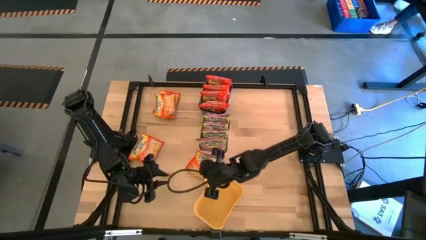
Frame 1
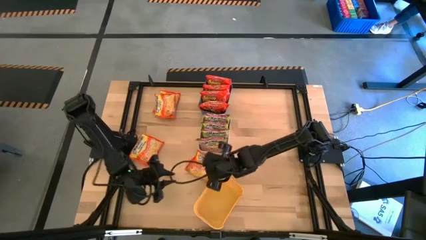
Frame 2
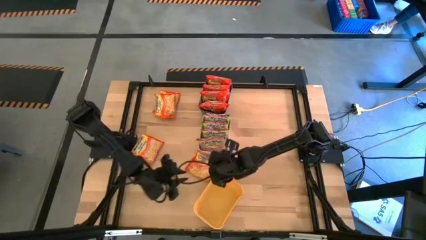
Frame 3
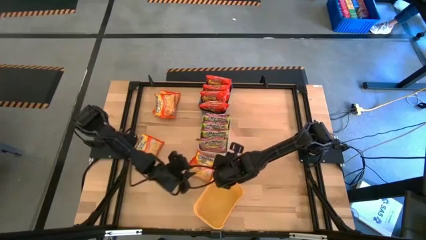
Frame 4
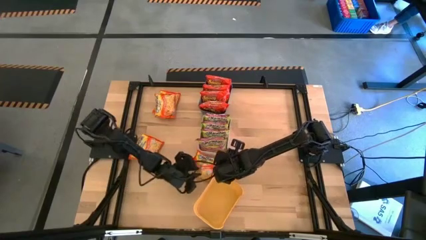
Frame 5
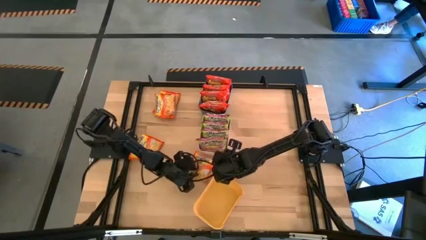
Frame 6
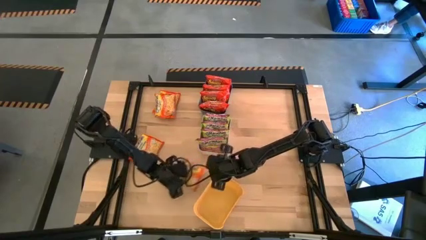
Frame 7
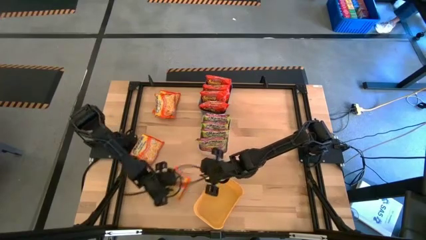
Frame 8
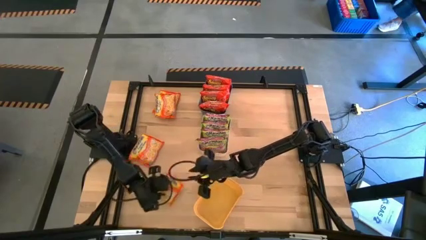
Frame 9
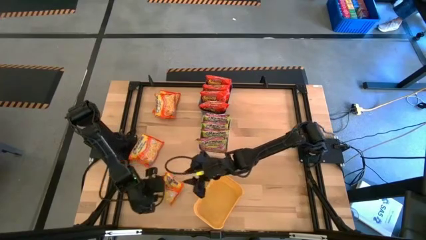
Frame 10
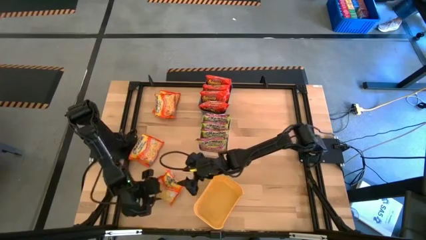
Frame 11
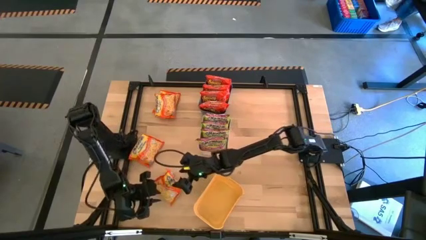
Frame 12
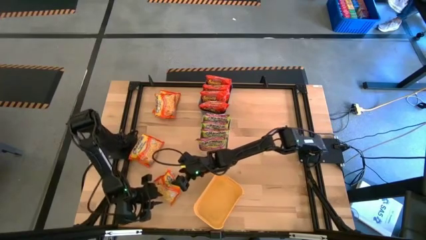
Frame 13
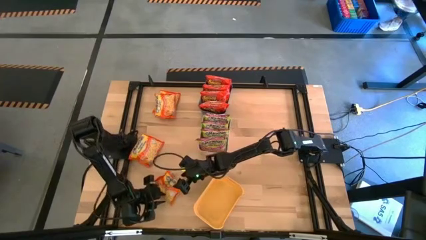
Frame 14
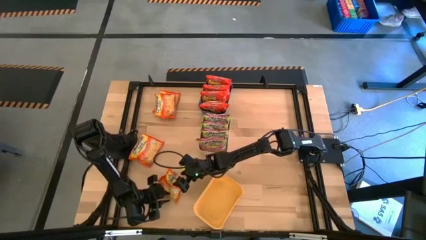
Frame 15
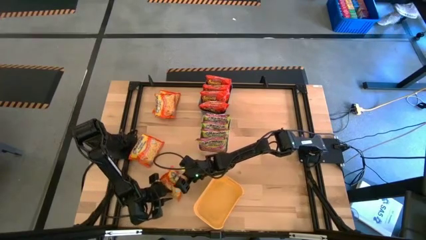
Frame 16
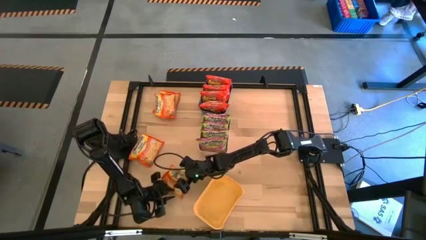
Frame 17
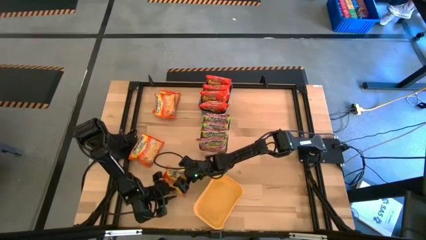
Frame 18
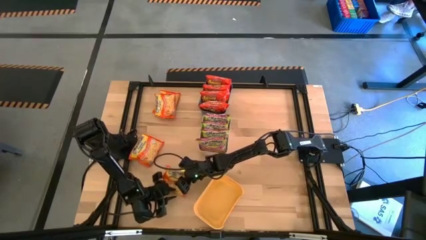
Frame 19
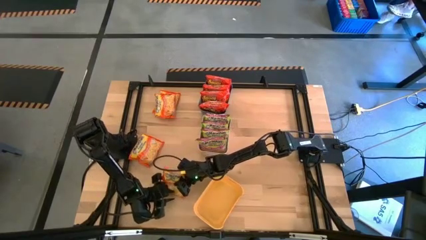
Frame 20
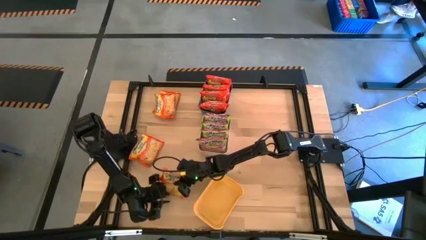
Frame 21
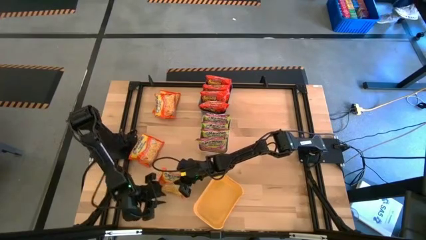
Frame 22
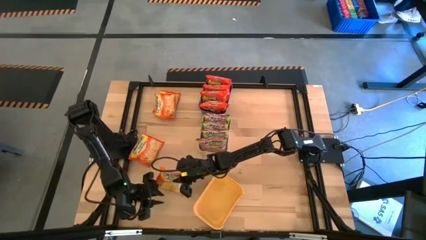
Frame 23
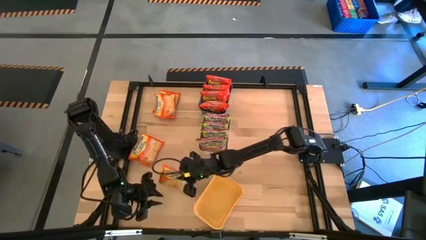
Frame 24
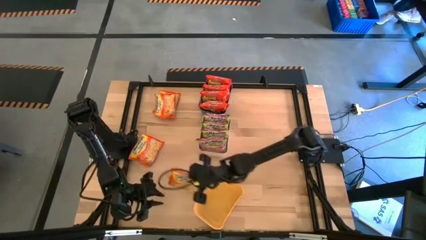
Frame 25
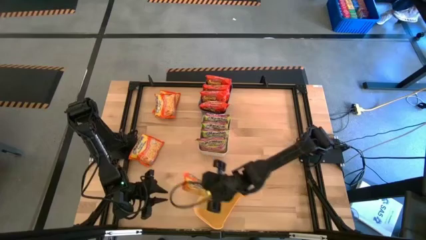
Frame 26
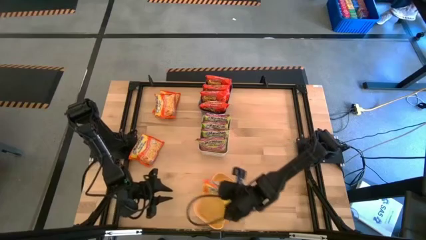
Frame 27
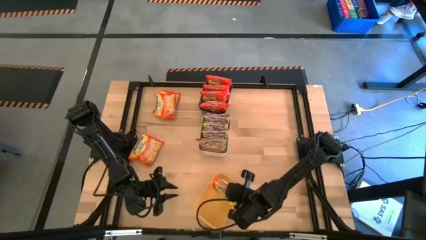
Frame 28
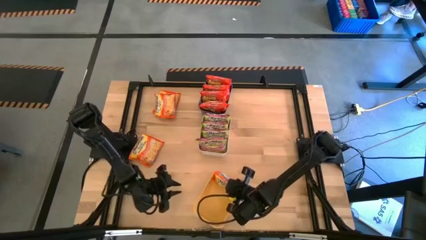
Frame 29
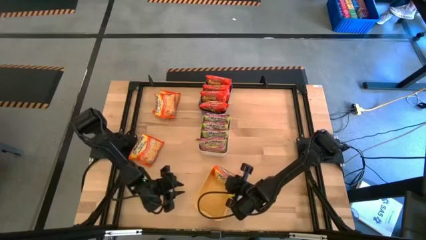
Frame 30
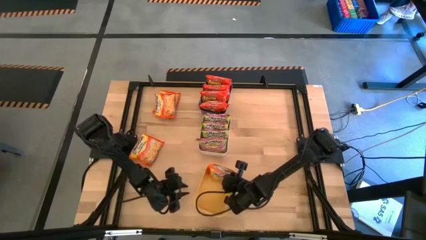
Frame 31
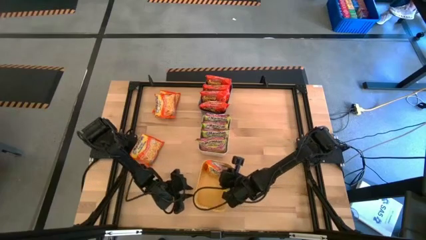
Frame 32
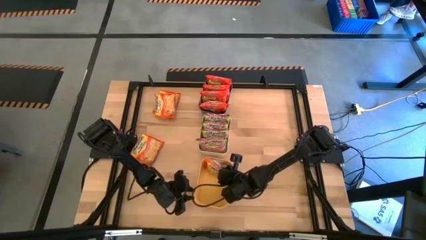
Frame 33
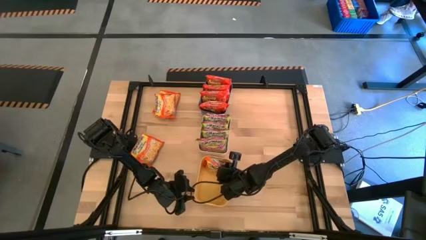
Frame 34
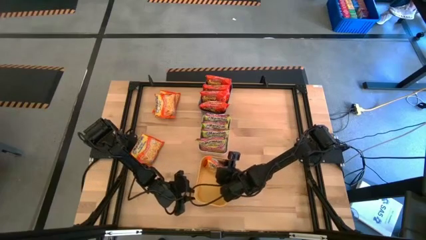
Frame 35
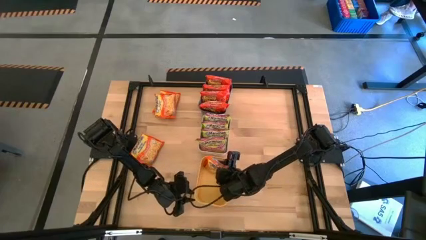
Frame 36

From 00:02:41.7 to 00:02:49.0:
Task: Sort Maruchan noodles
Put the orange noodle pack into the yellow bin

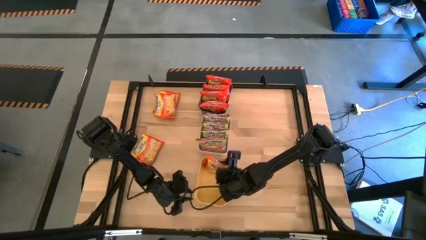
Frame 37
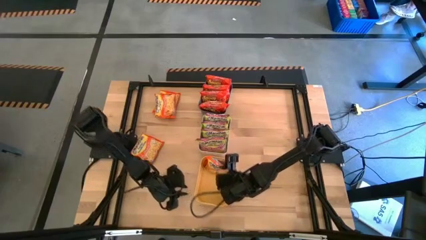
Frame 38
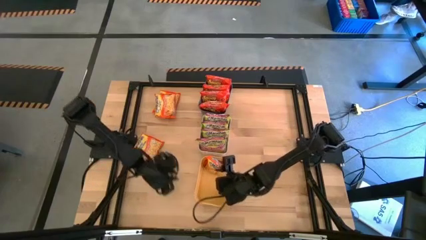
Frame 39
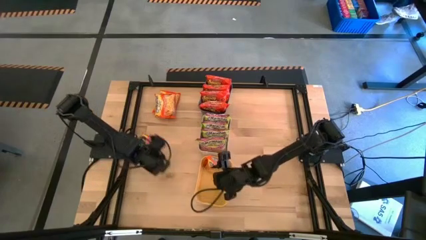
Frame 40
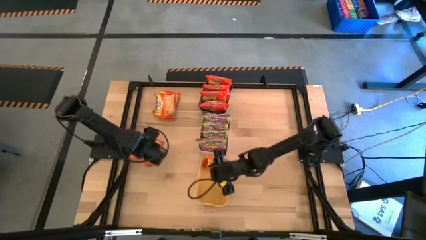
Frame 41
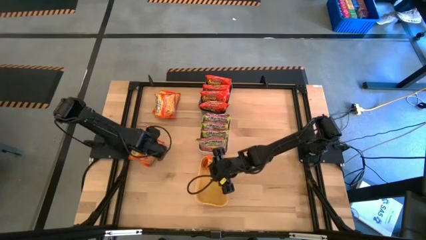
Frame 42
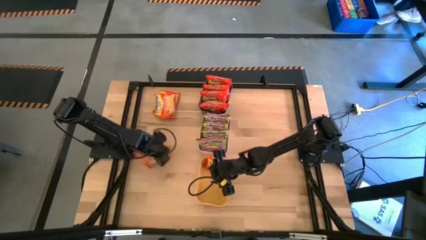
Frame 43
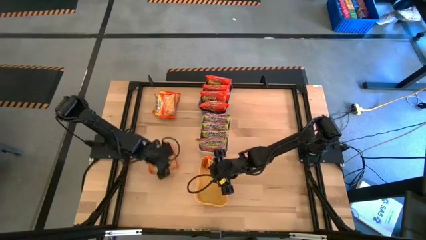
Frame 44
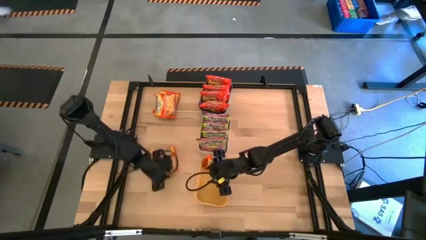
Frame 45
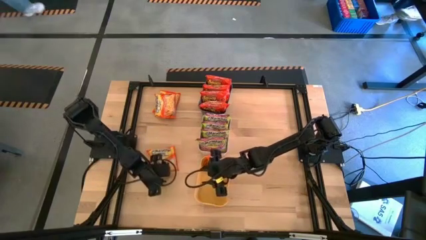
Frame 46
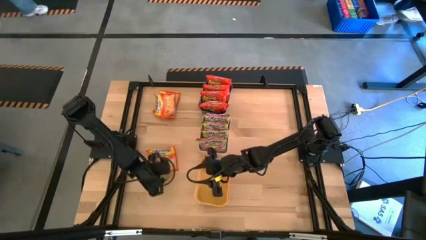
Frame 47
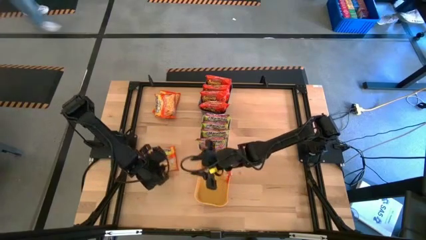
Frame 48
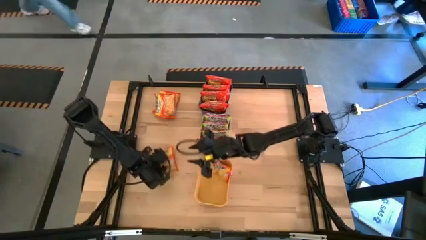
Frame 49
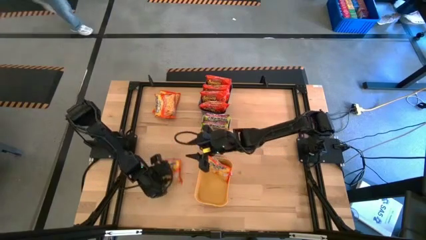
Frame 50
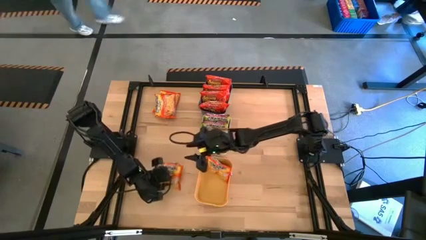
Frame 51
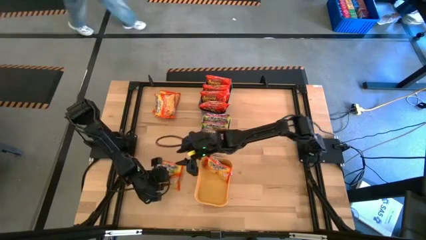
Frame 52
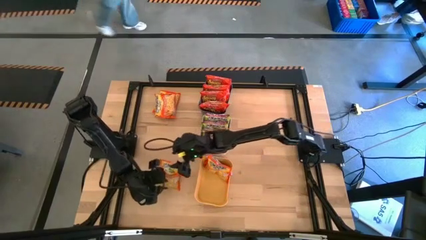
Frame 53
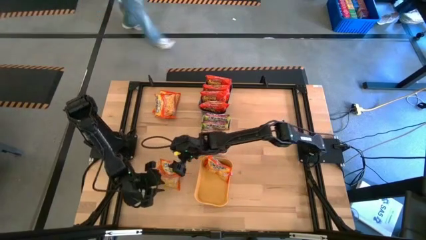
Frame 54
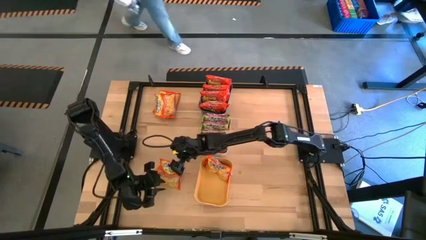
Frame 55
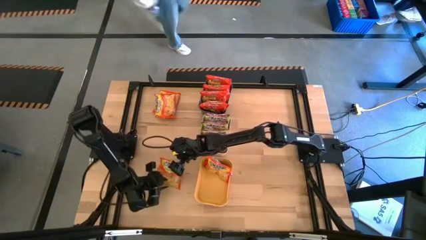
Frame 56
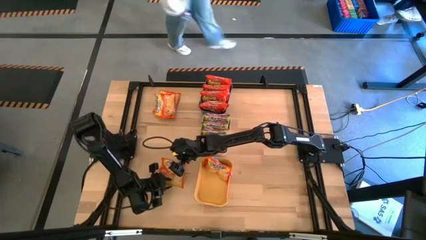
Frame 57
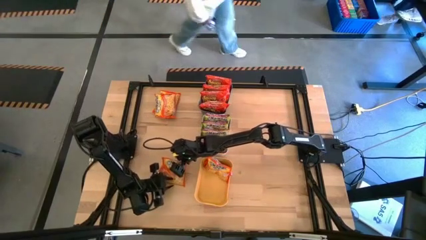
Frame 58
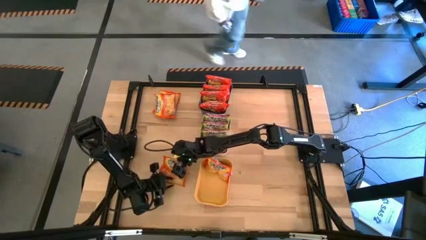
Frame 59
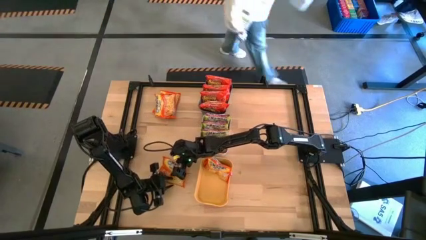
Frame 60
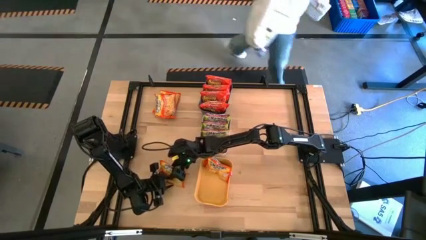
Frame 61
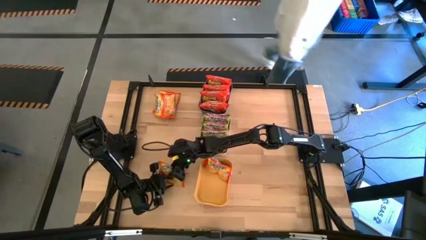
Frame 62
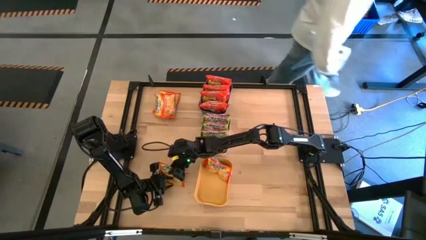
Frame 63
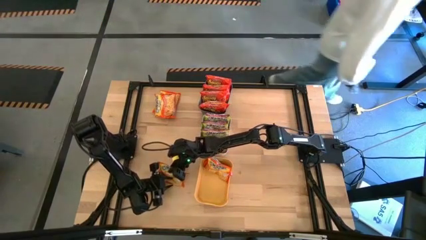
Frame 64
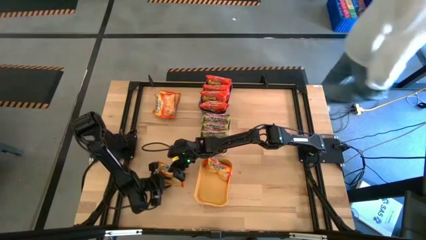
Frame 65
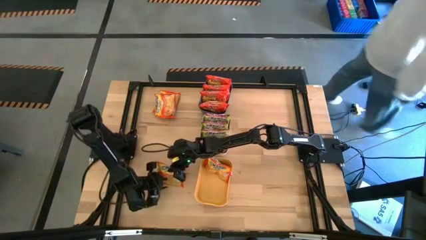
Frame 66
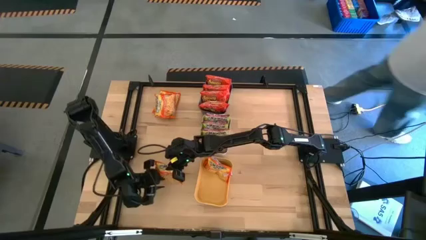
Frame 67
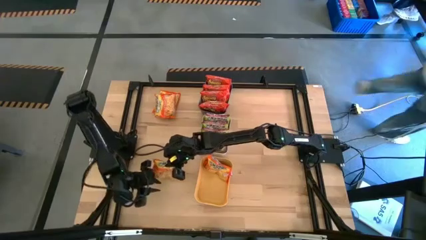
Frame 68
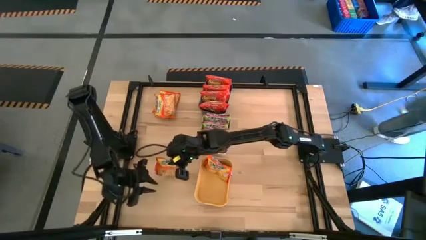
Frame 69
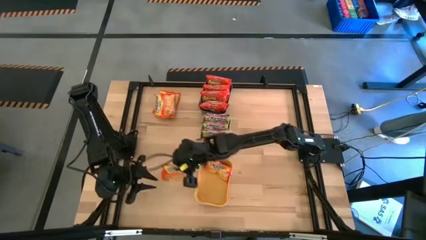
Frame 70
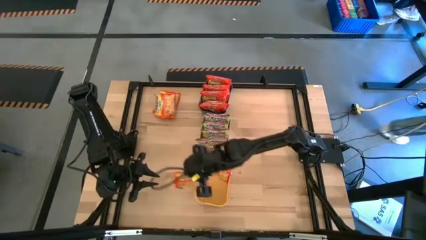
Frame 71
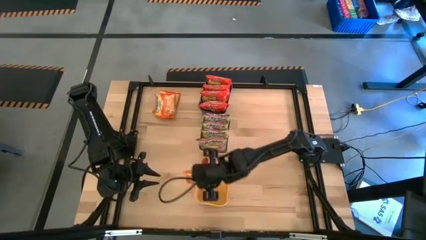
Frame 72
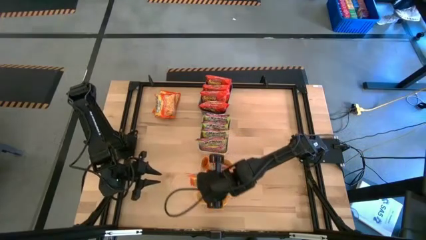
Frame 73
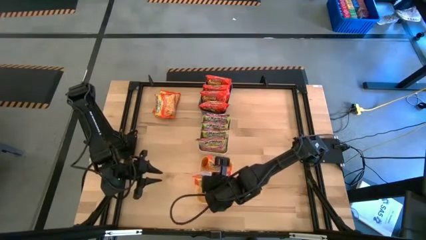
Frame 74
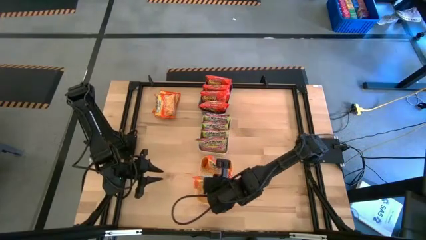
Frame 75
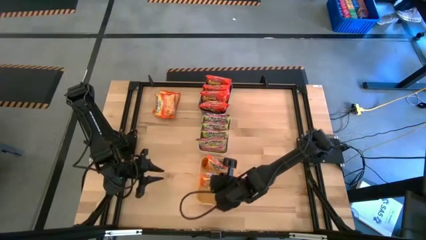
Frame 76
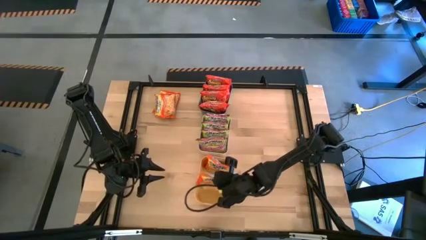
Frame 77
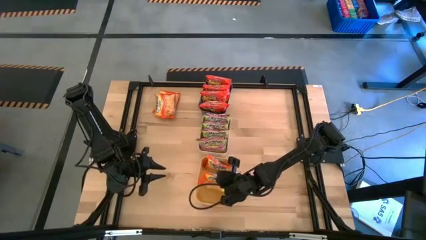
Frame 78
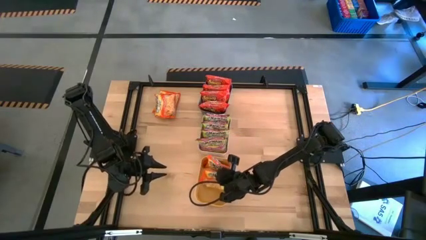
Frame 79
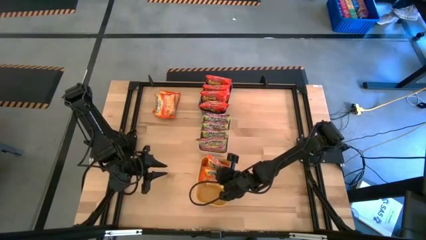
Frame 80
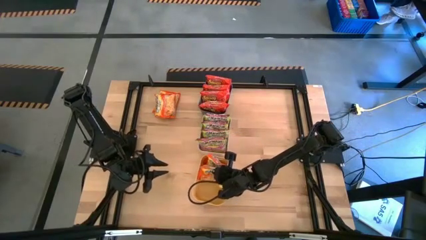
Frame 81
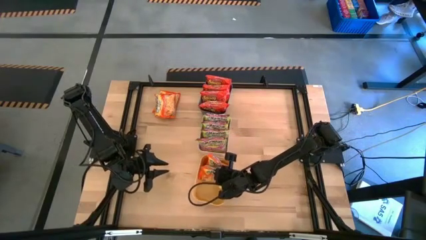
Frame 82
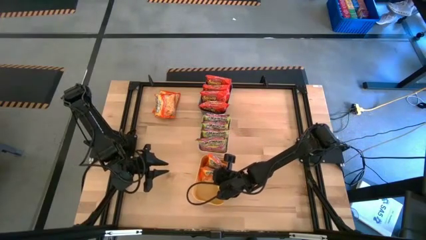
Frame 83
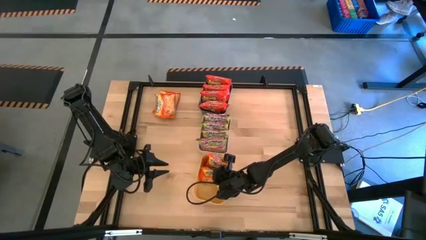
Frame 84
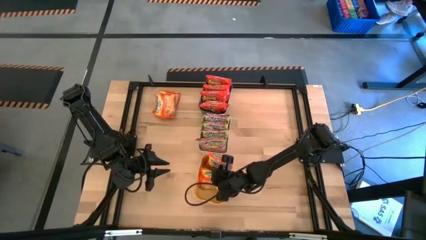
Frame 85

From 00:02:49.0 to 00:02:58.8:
Put the orange noodle pack into the yellow bin
